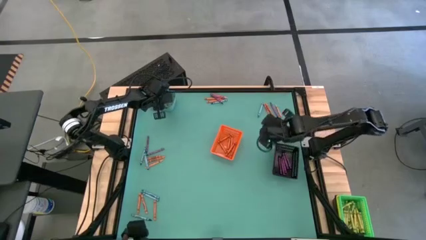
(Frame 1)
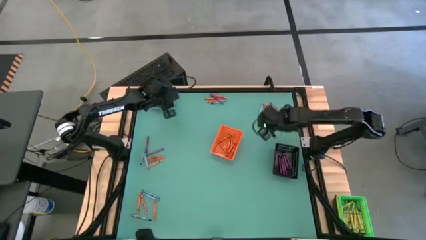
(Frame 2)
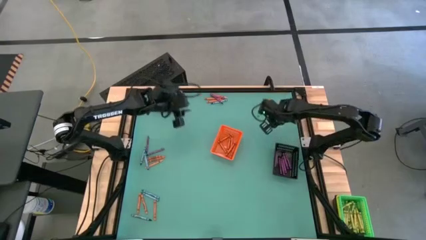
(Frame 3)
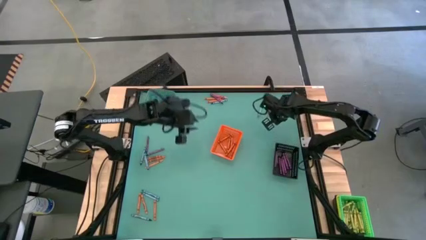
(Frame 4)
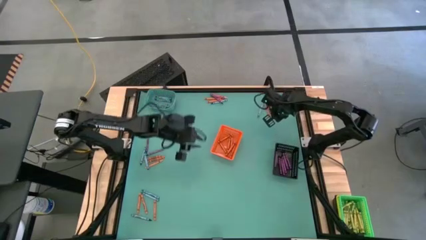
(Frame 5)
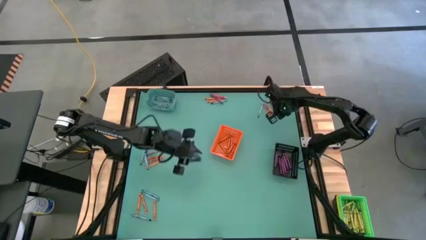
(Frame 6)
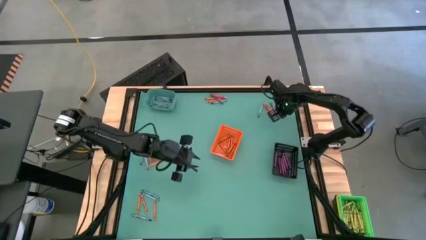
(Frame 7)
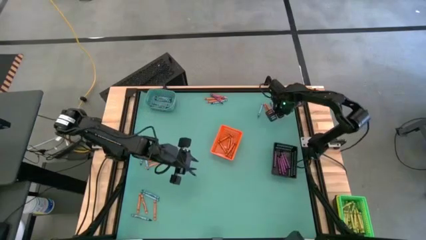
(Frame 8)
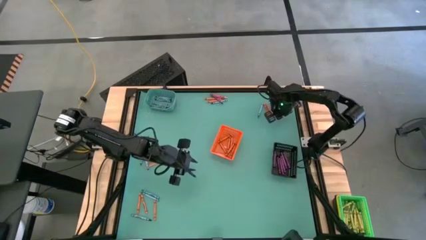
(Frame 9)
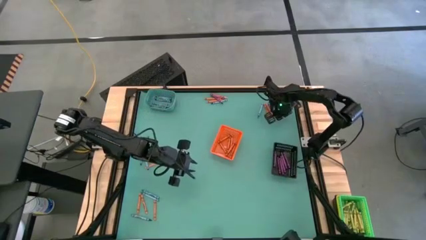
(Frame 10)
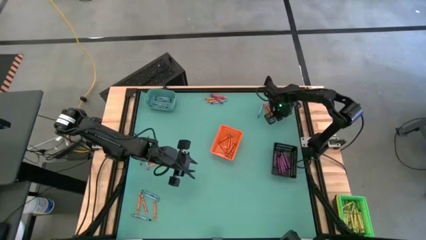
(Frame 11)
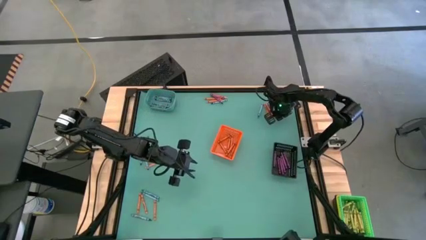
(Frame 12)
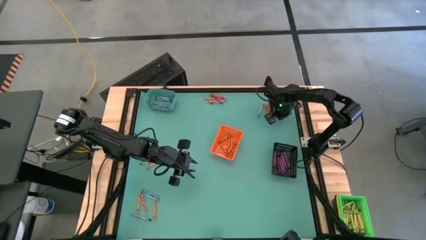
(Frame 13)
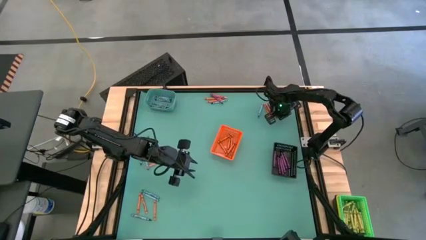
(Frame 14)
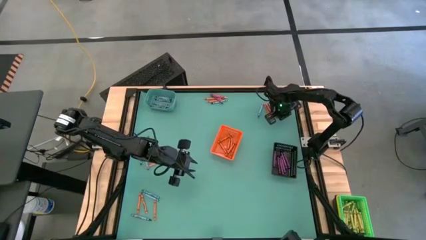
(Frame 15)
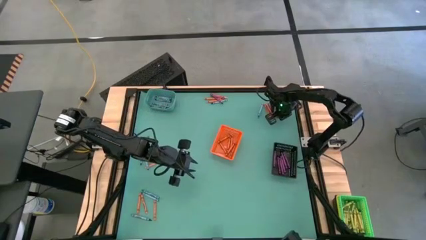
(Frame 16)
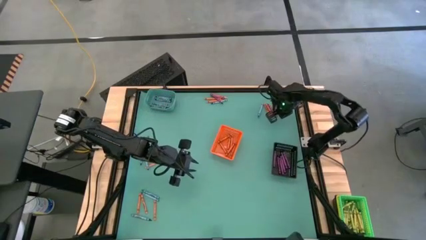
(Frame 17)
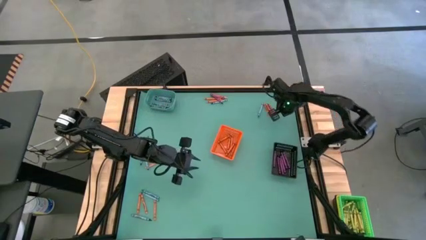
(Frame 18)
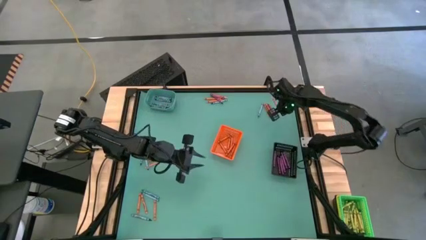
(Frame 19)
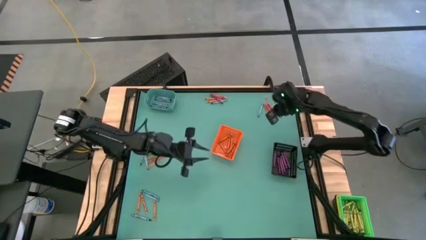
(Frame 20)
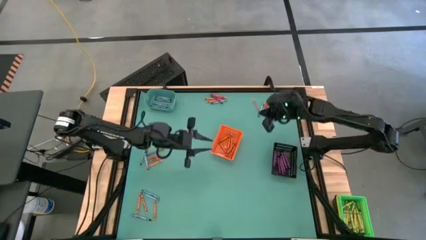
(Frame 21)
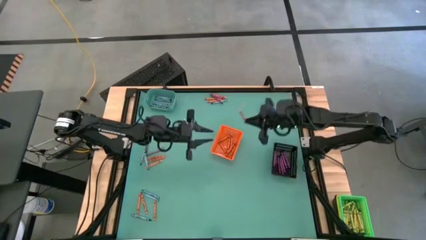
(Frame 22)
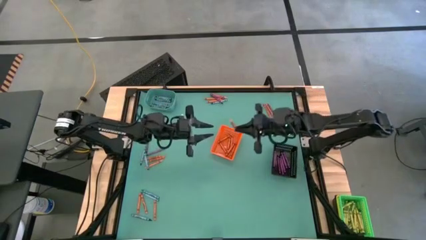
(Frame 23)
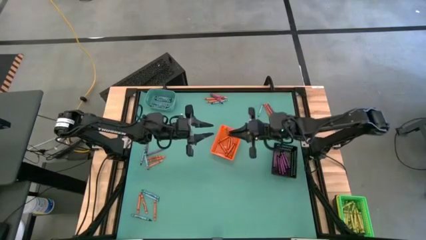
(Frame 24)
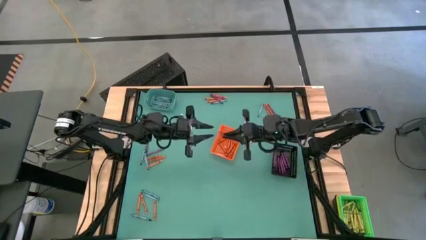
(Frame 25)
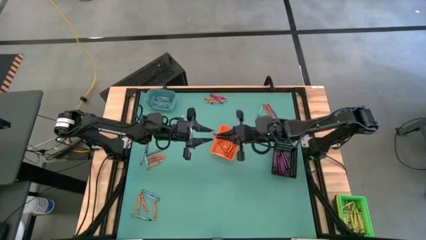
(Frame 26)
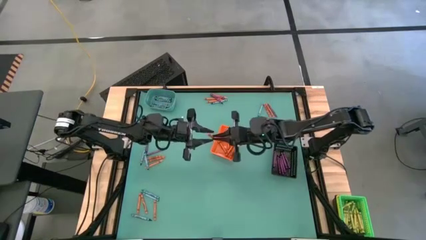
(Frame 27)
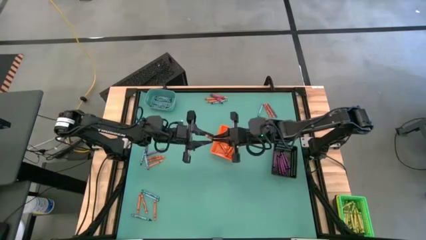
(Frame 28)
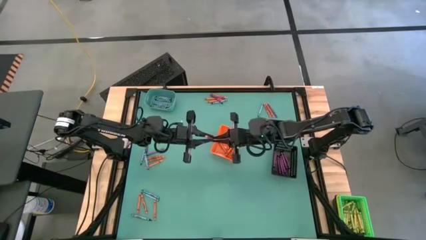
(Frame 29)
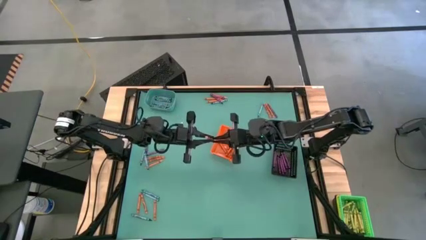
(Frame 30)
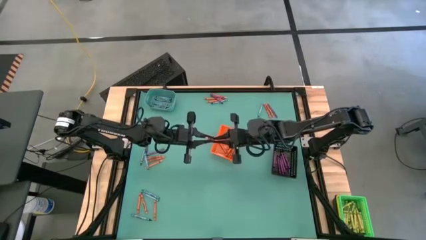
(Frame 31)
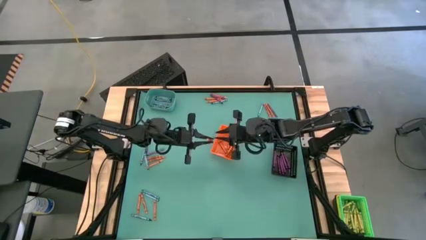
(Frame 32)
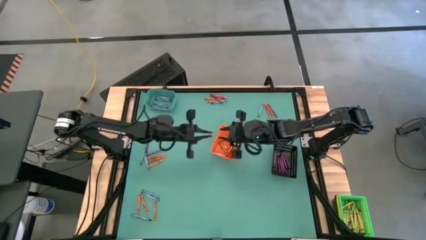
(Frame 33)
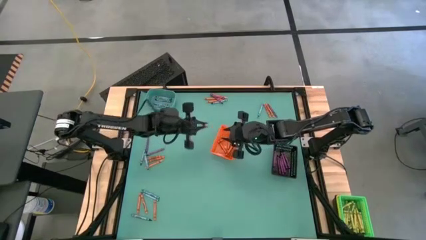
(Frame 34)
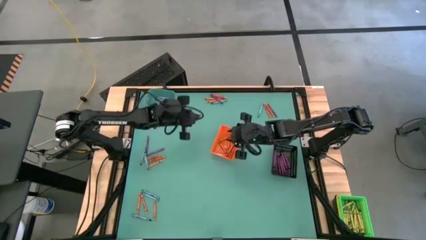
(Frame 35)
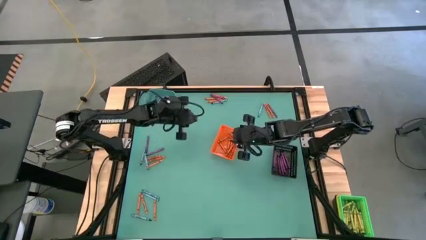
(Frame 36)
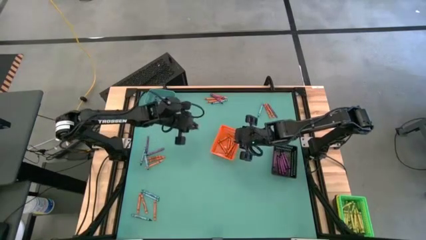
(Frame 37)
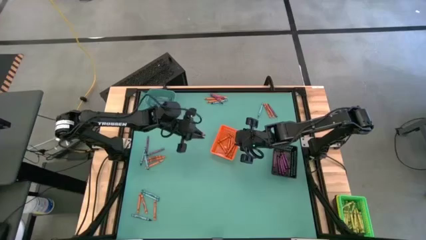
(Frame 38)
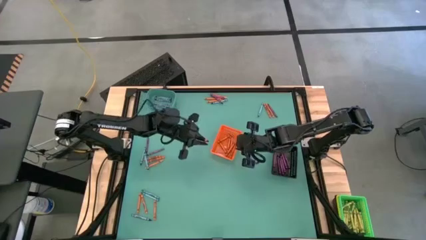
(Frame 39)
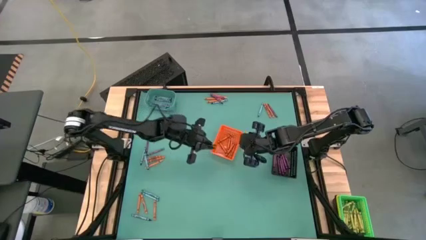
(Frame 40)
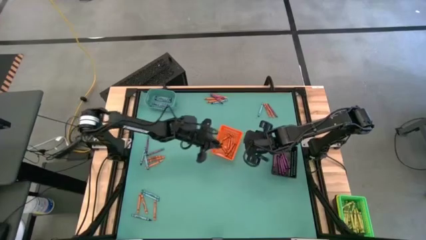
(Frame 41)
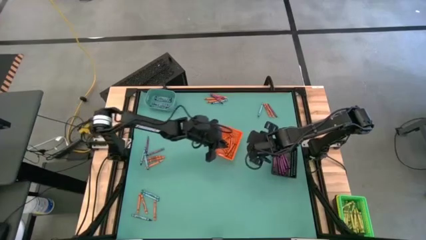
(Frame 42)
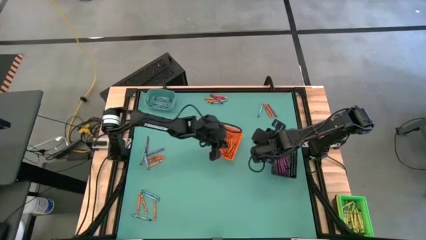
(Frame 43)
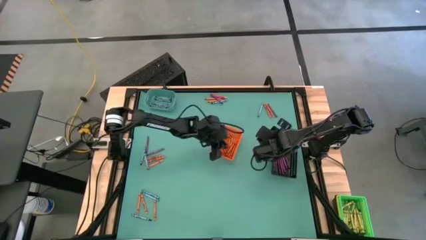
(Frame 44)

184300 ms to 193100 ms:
Task: Sort crayons
Put the orange crayon into the orange bin

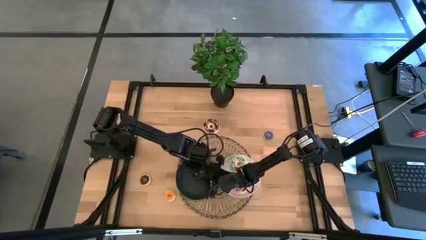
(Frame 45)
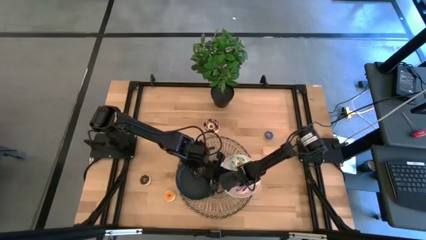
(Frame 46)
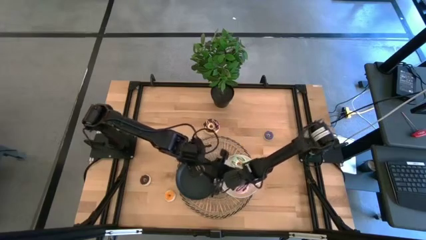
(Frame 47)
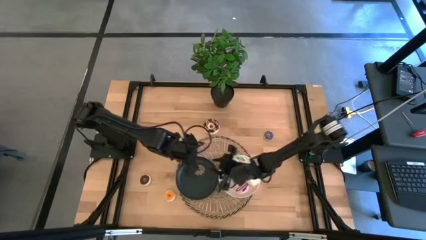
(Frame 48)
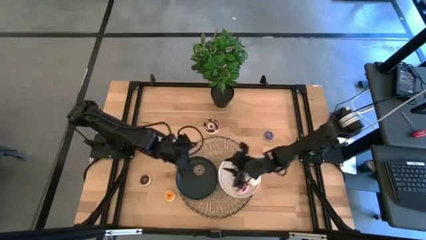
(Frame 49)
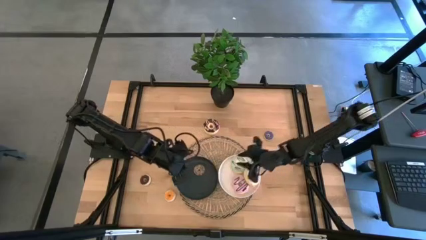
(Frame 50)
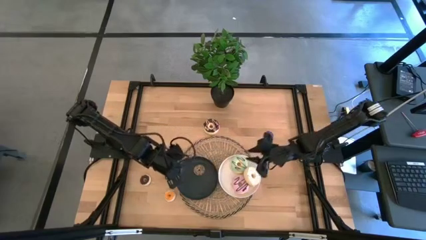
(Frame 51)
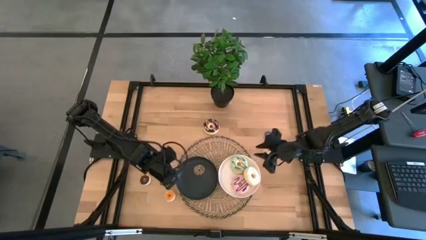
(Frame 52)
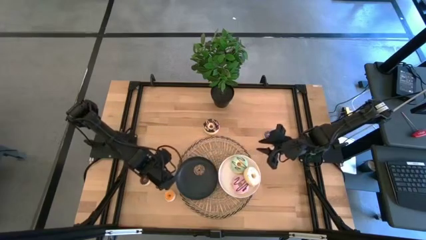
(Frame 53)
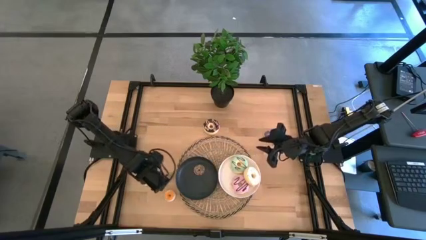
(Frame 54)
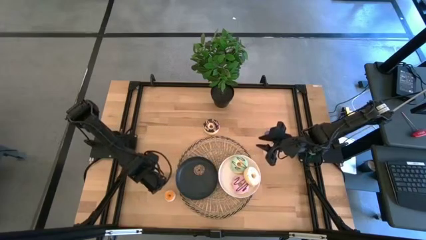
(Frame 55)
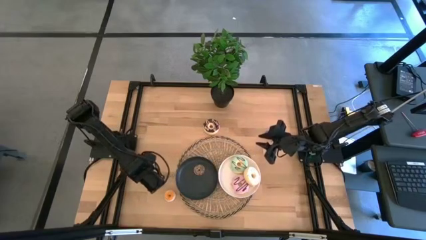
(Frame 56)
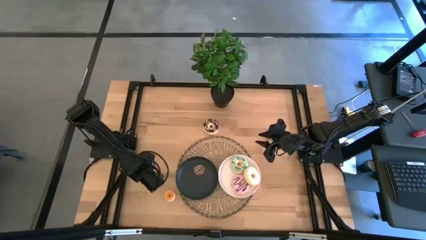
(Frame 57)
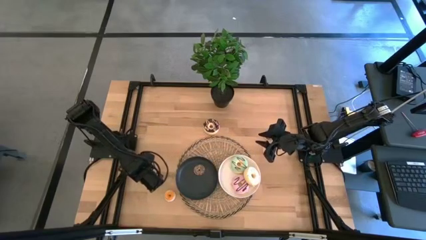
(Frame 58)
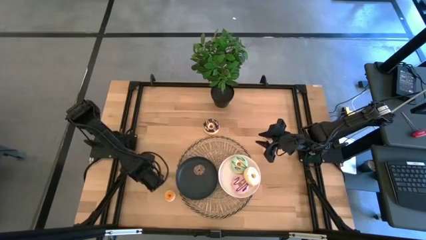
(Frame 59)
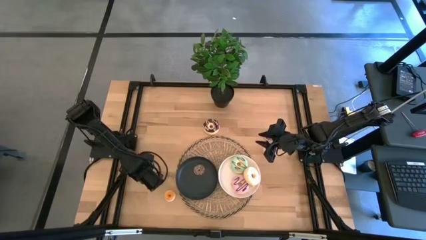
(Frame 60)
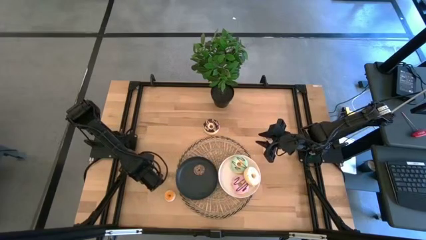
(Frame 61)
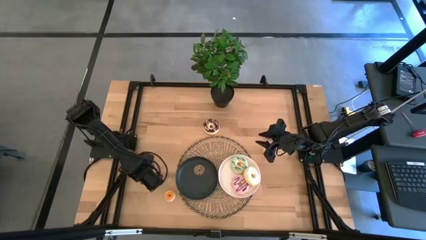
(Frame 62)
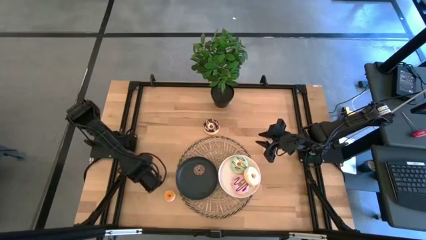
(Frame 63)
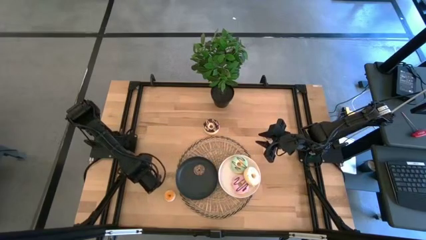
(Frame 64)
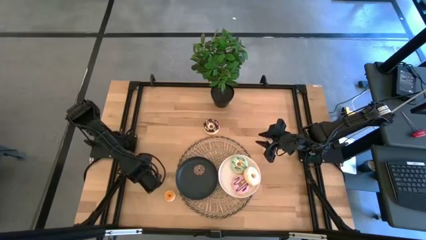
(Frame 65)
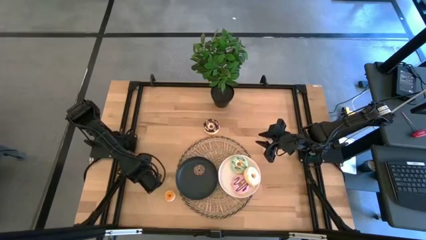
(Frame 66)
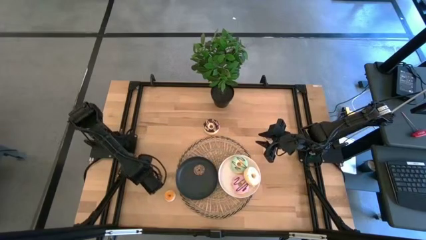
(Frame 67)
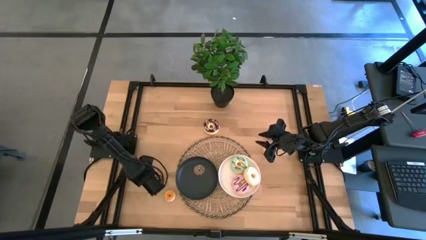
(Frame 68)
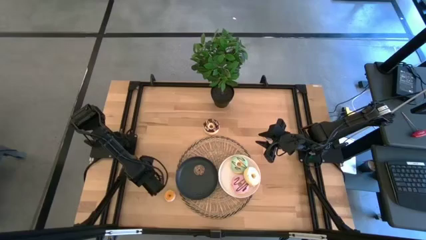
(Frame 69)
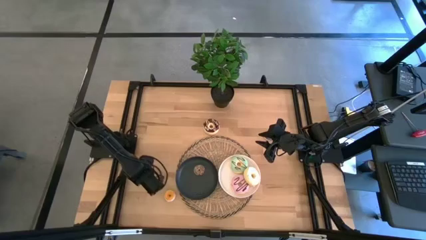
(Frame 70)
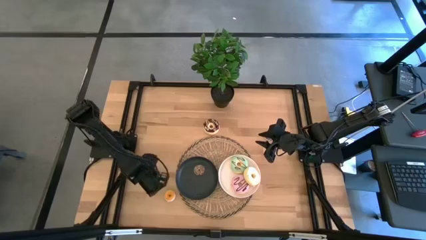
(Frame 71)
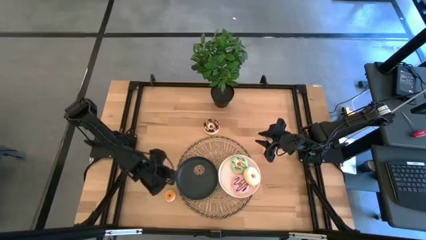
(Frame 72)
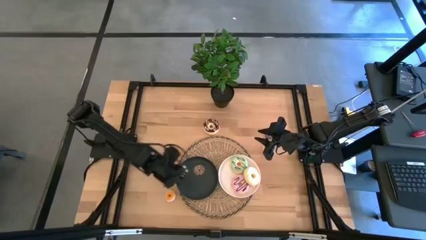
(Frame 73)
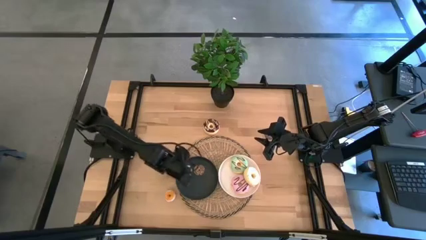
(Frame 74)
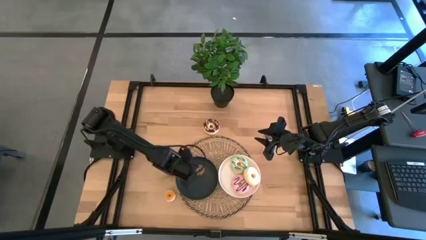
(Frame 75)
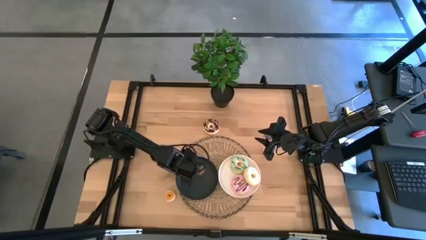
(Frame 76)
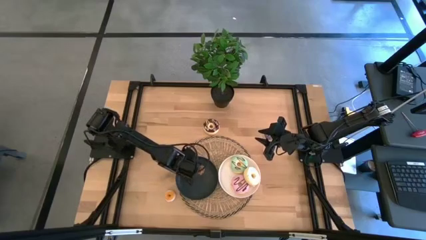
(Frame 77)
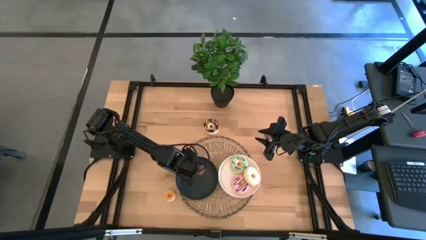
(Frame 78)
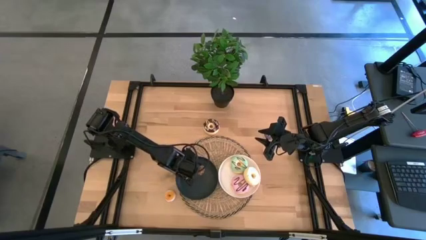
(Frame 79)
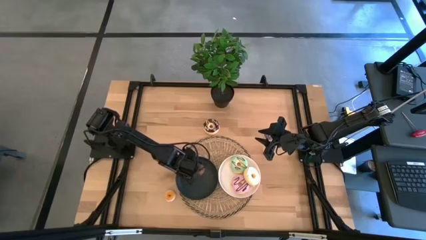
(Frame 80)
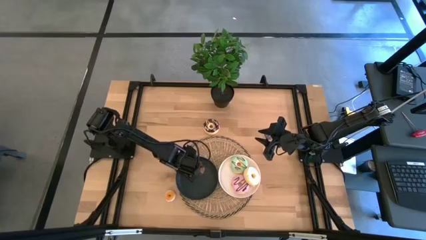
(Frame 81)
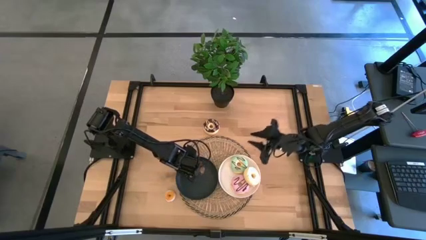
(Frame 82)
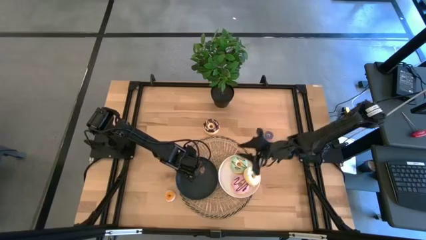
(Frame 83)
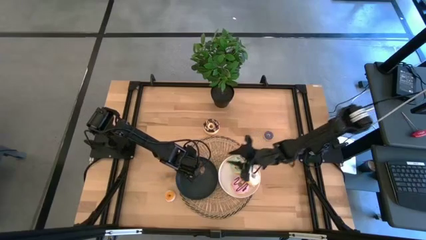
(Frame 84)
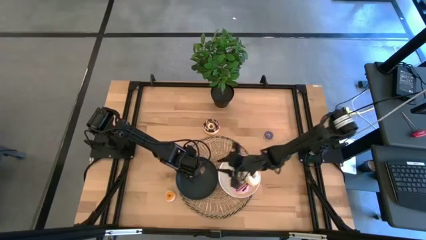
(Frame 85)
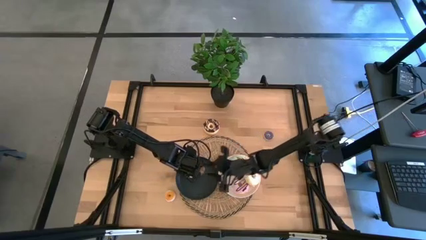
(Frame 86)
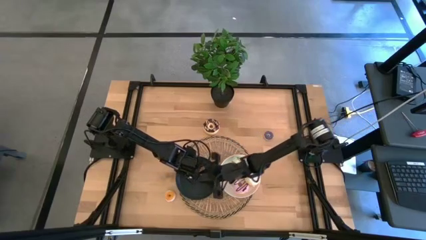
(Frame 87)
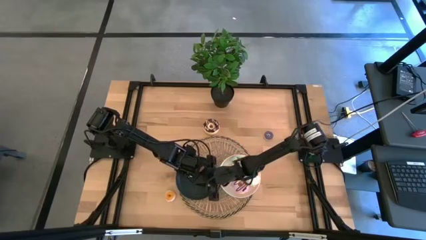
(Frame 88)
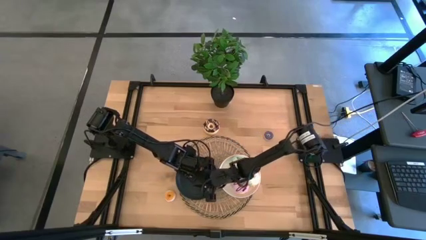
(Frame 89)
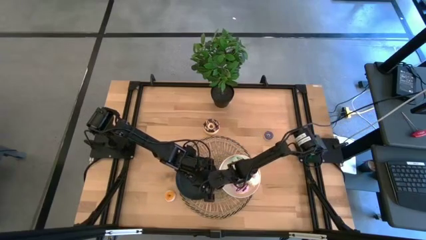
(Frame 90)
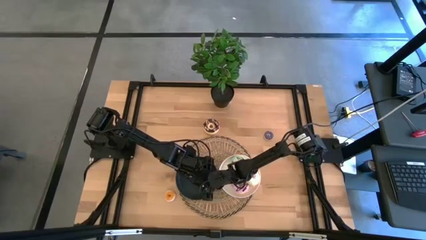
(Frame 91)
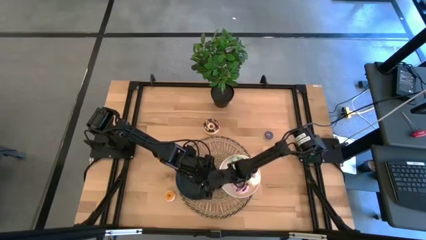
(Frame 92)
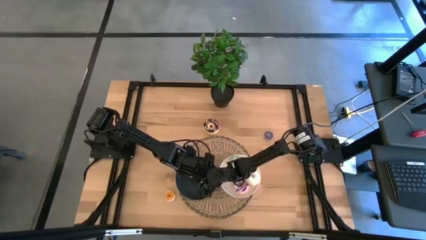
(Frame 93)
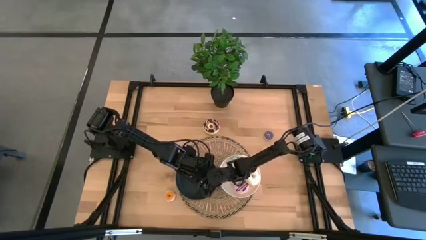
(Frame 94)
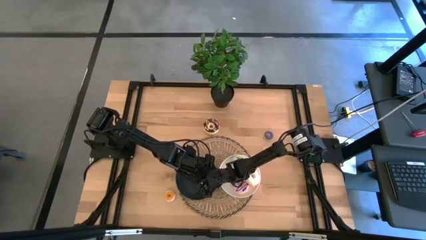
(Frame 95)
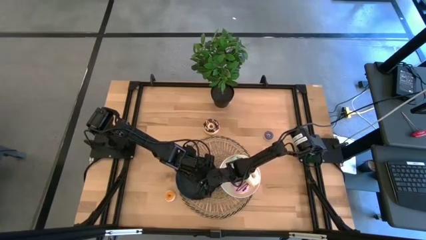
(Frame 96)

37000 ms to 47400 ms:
Task: Pick & Place donuts
Put the small black donut on the black plate
